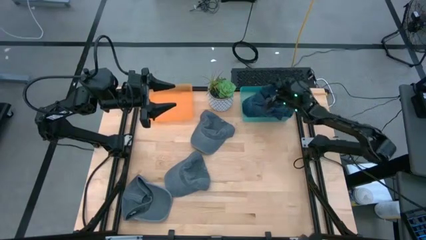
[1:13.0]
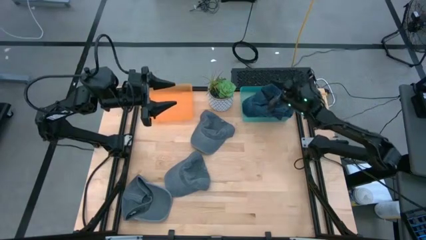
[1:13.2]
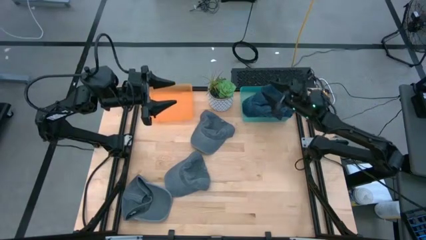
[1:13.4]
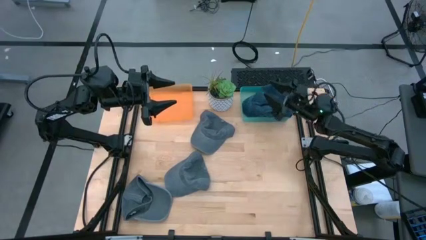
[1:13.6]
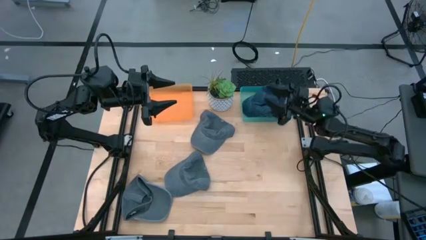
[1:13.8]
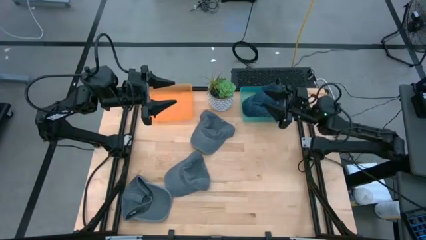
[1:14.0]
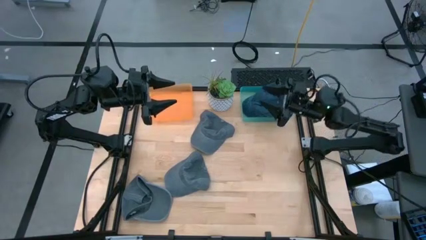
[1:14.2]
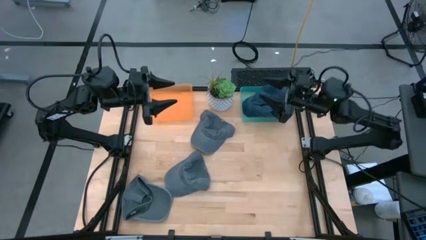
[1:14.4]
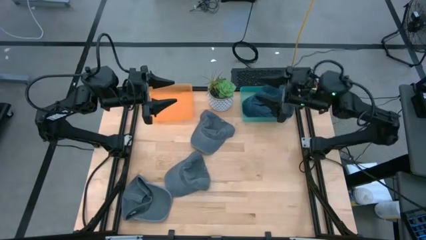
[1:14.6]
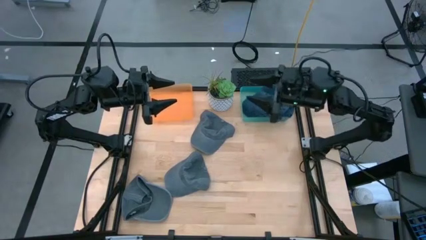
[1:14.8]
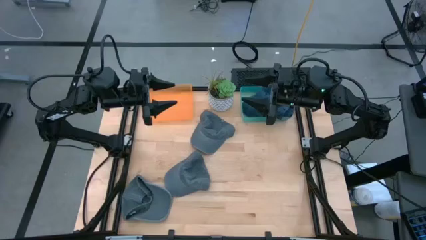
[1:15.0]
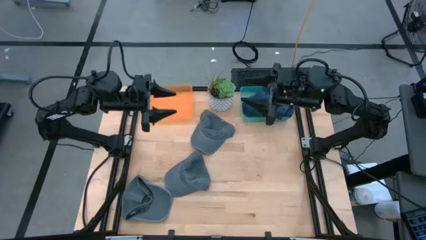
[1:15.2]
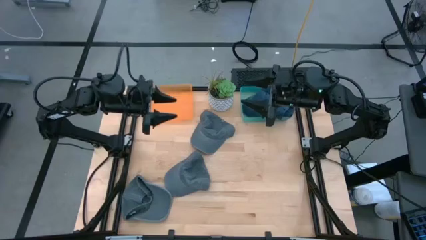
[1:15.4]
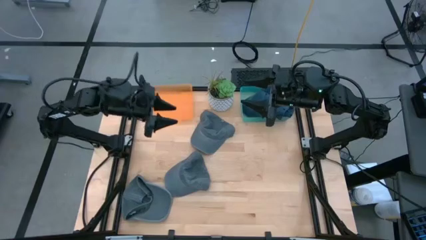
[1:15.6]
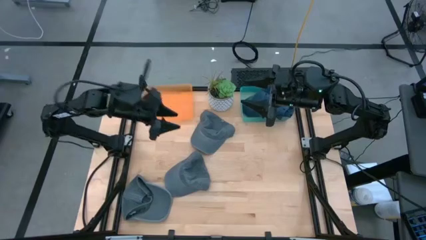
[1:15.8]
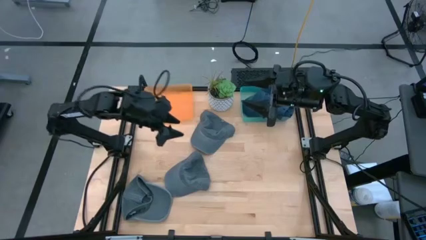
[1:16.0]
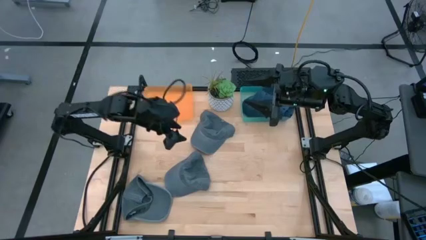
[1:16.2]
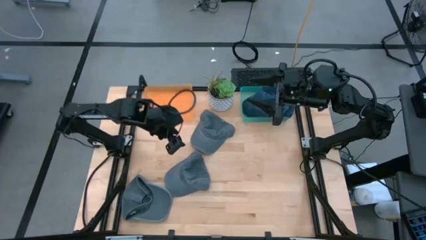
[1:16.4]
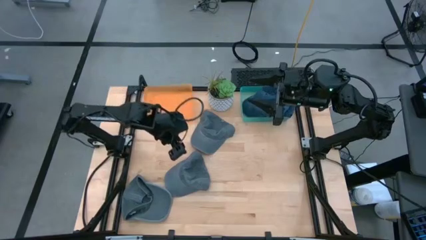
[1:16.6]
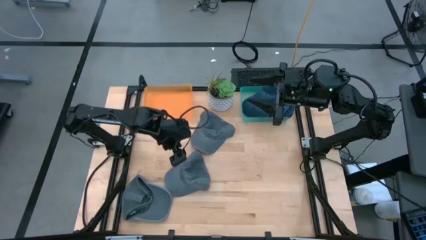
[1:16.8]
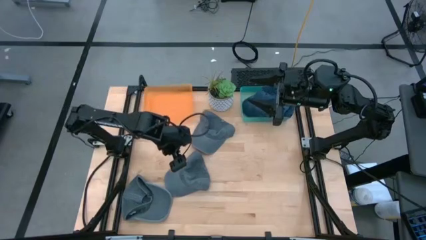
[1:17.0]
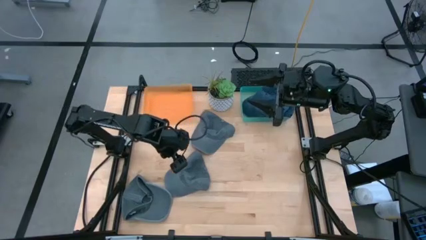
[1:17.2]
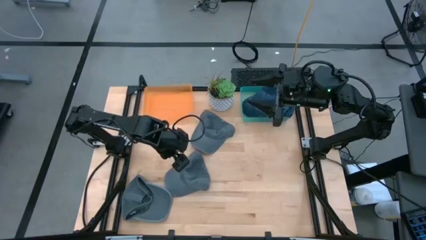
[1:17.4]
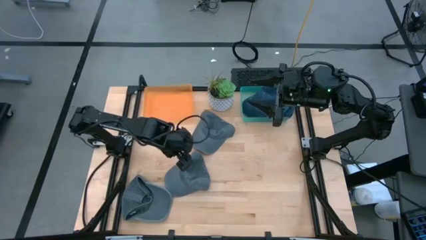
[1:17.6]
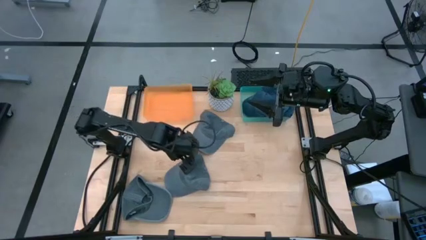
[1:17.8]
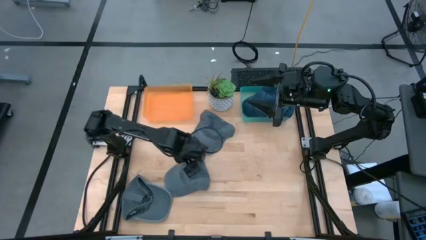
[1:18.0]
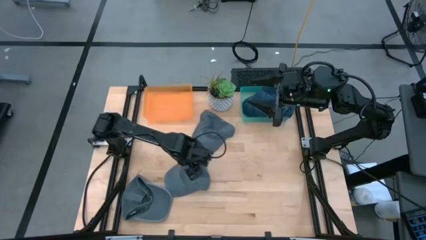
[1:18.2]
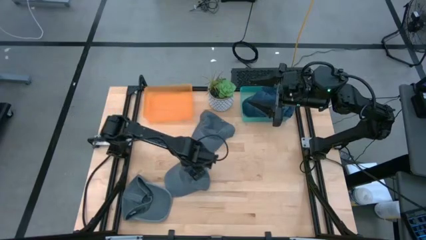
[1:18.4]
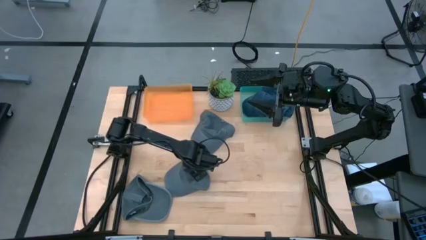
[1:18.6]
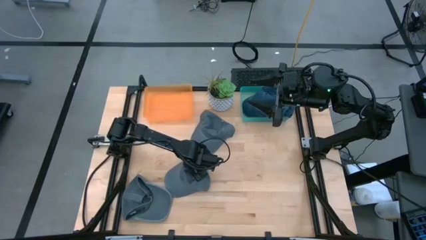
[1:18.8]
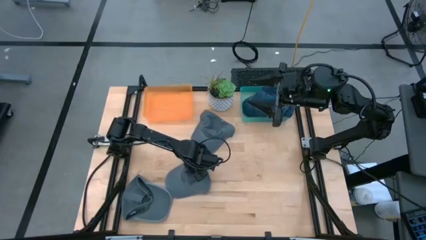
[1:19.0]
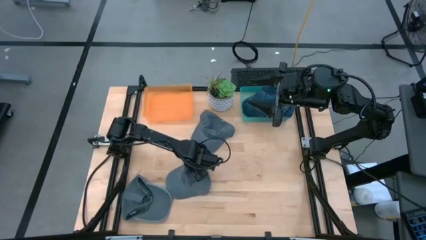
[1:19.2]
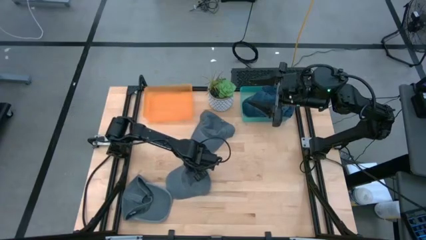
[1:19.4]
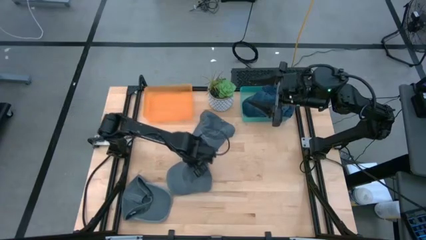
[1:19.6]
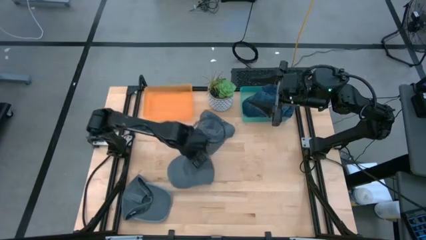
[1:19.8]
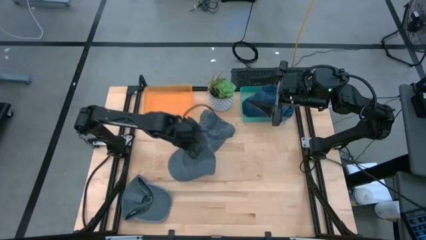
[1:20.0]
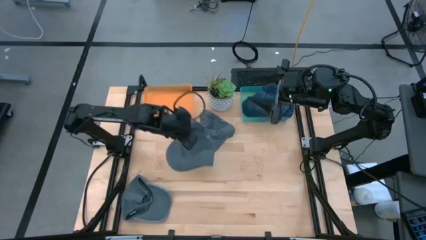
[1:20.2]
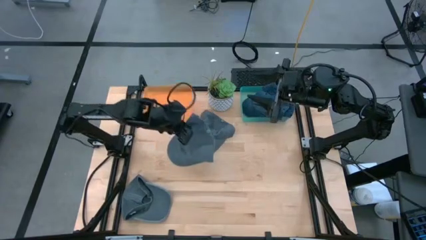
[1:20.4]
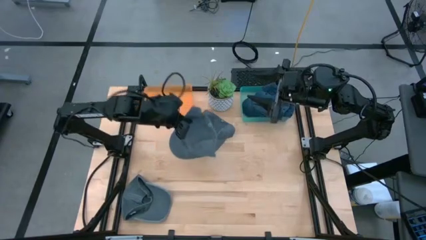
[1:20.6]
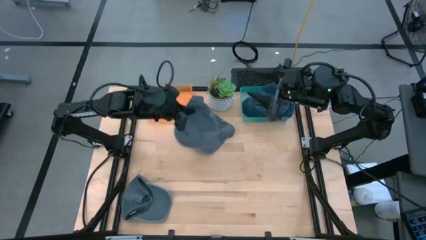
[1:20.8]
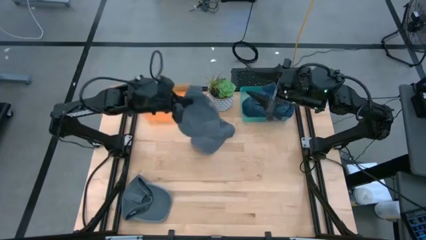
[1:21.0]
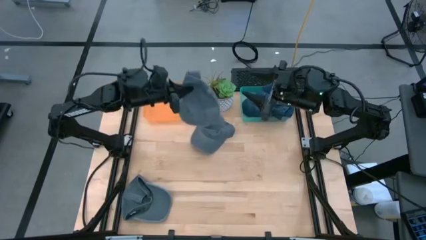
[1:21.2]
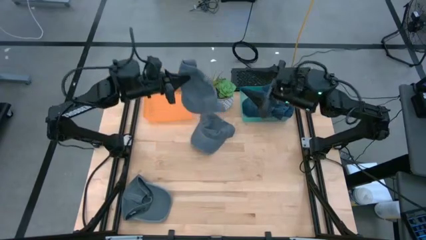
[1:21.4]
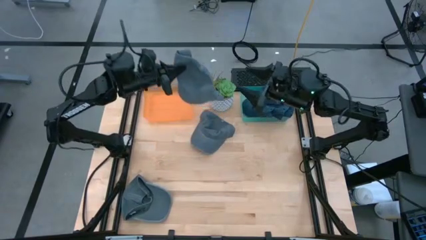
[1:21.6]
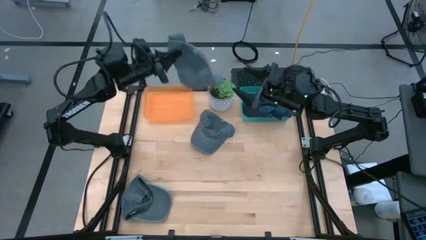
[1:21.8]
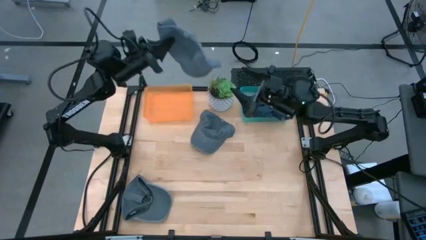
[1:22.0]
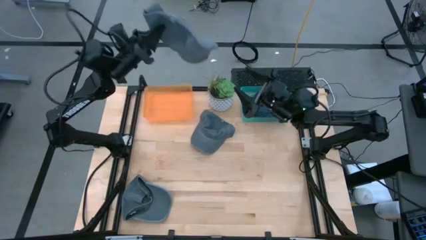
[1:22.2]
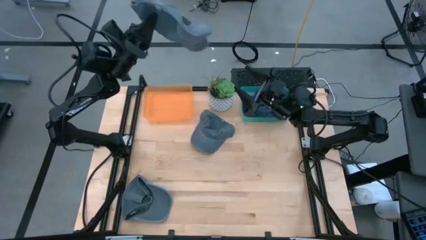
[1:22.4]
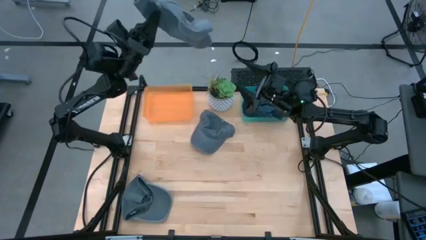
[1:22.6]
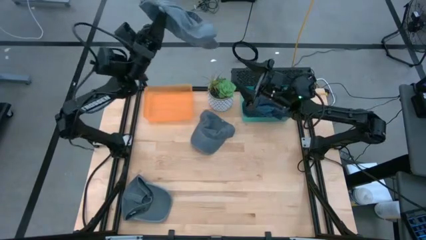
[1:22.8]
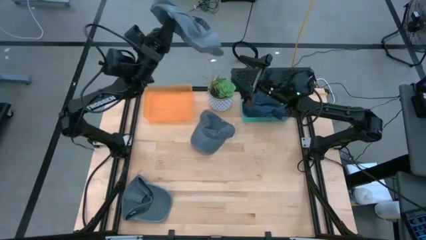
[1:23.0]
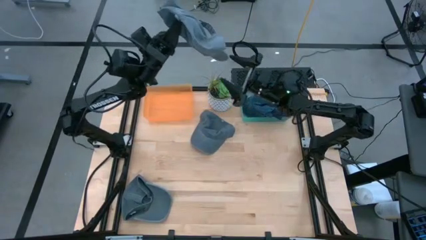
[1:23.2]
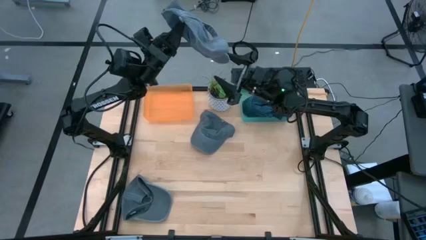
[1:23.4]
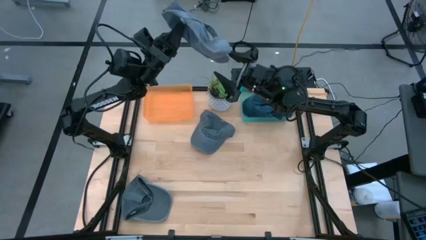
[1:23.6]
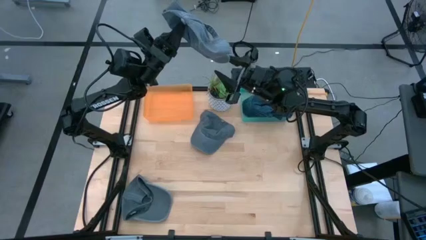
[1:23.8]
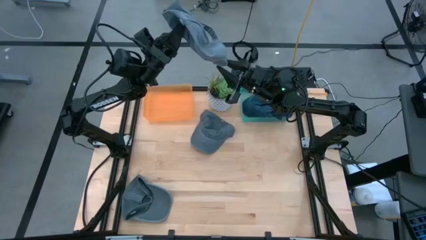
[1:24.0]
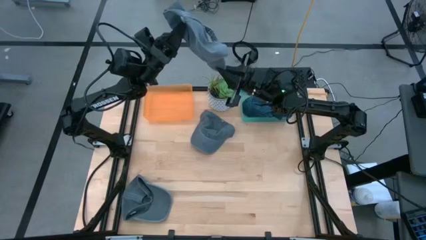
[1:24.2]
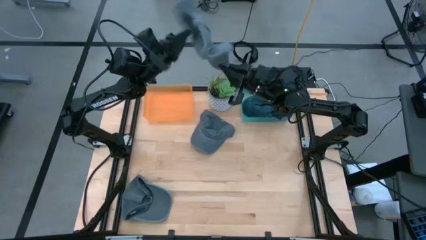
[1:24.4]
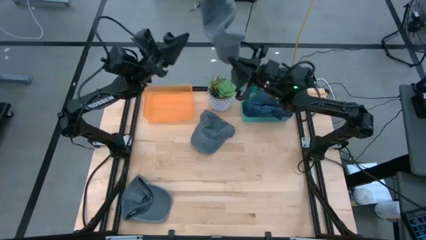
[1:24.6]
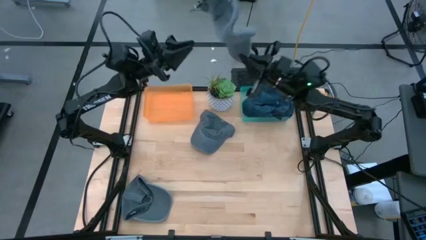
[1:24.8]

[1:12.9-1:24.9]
Task: Pick & Place hat
Put the middle right gray cap into the orange bin

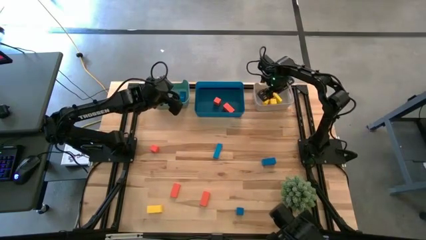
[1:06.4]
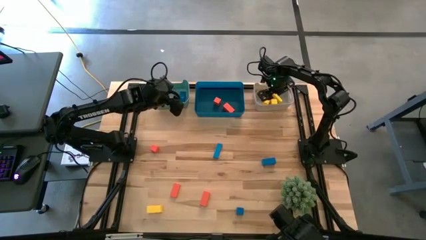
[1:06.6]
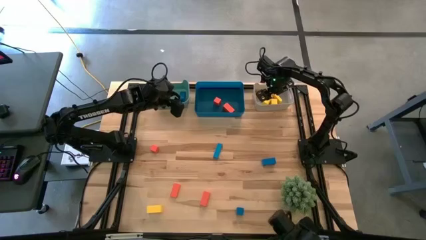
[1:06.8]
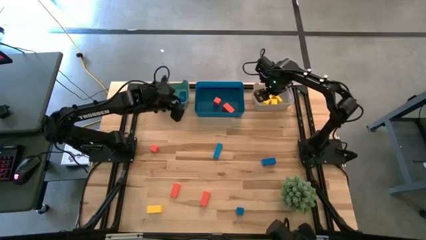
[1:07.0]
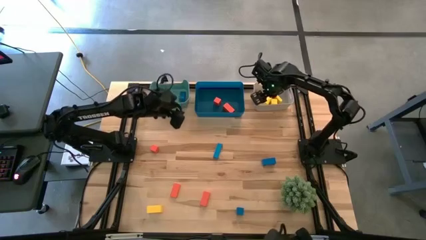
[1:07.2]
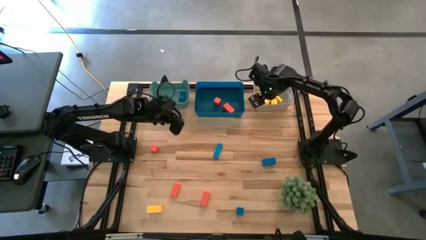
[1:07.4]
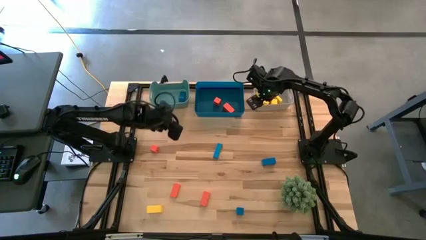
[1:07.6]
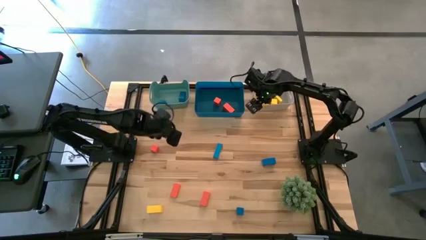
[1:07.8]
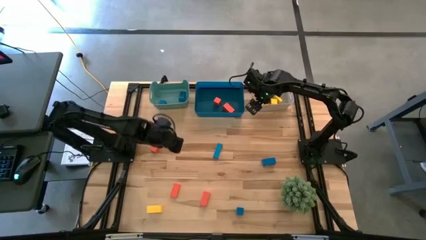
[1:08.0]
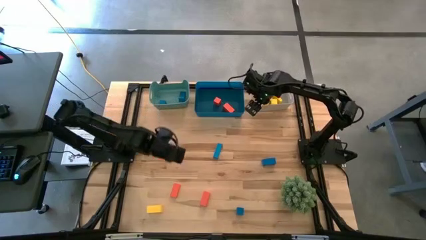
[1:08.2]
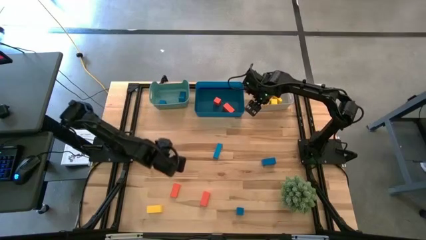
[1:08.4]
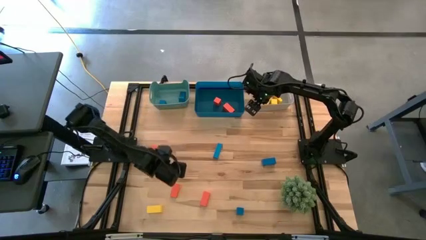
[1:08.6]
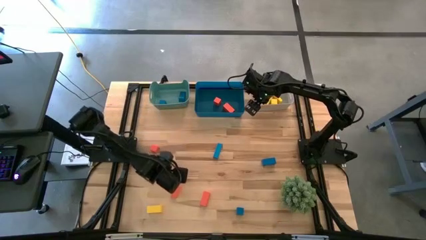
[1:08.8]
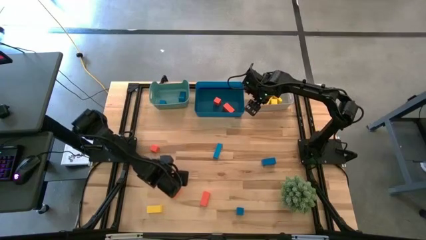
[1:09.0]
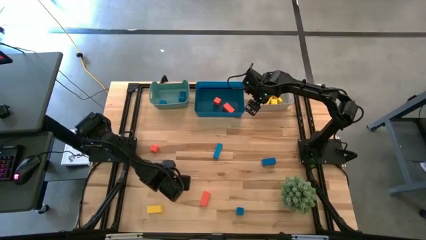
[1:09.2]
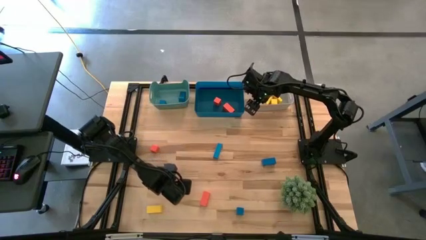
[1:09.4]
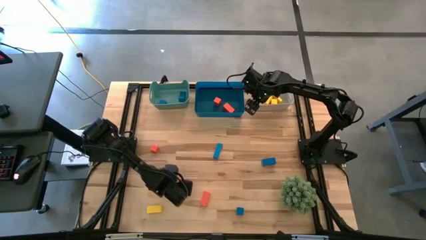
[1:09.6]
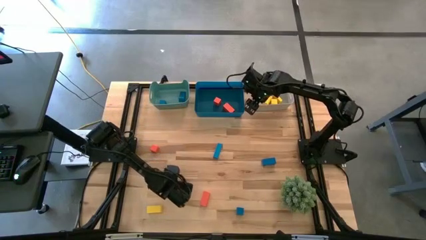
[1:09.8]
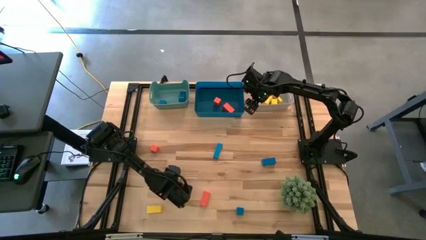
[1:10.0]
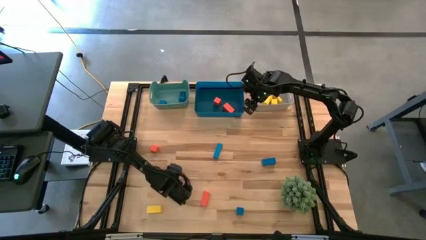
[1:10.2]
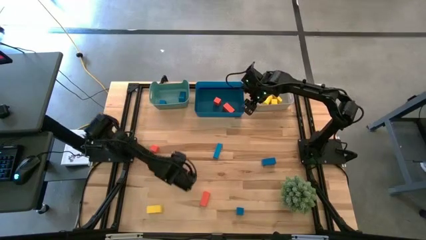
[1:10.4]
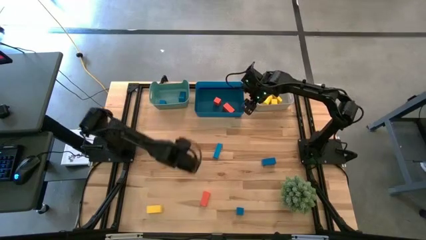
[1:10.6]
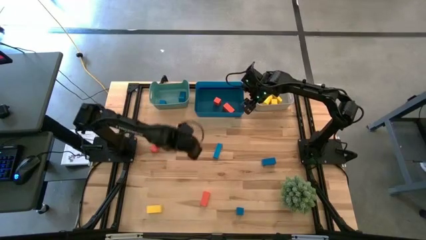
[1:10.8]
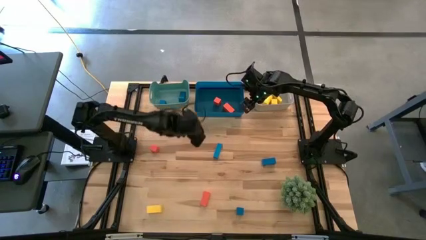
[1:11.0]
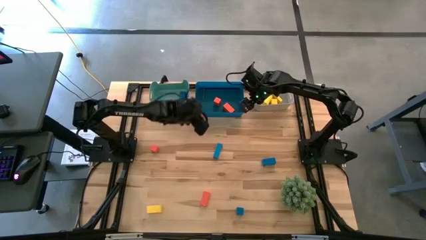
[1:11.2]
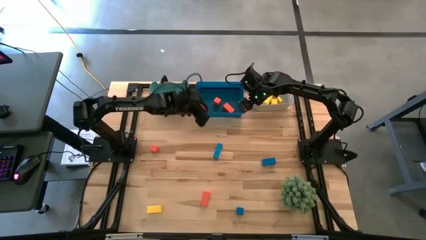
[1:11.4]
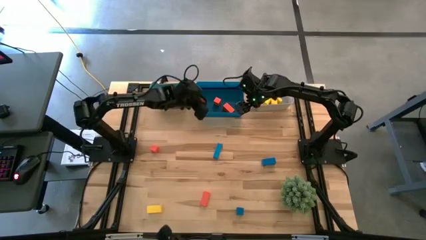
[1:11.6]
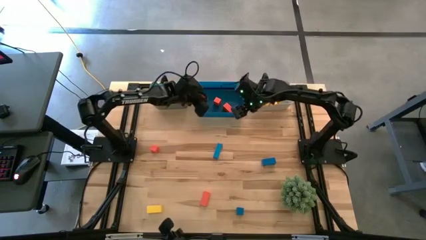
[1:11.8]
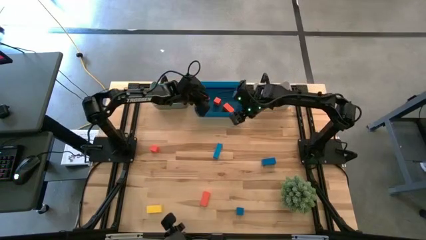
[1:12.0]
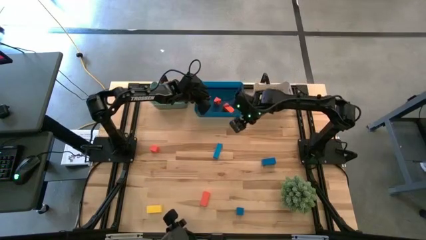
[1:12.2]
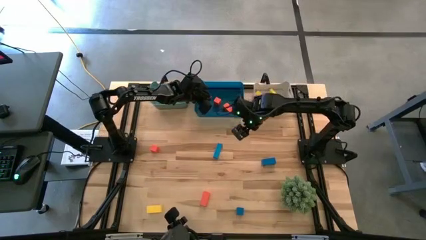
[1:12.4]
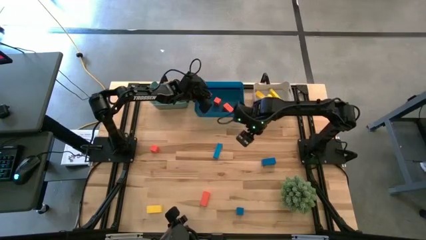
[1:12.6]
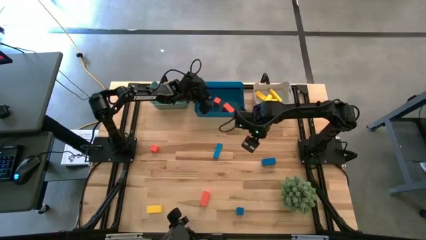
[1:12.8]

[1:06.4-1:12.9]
Task: Sort & place blocks by color
Put the orange block into the blue bin
